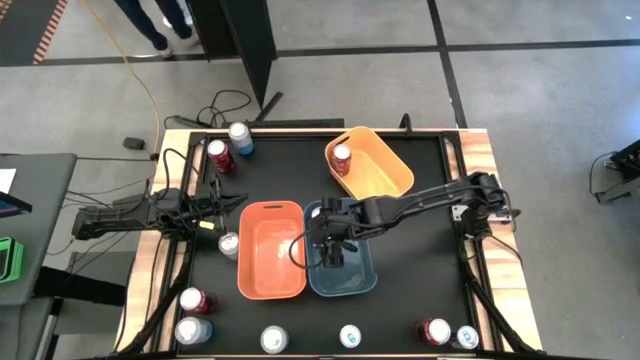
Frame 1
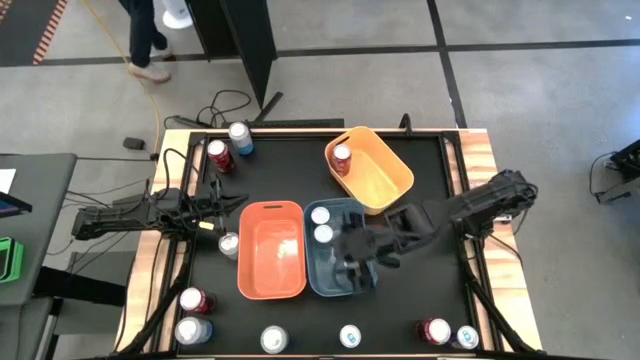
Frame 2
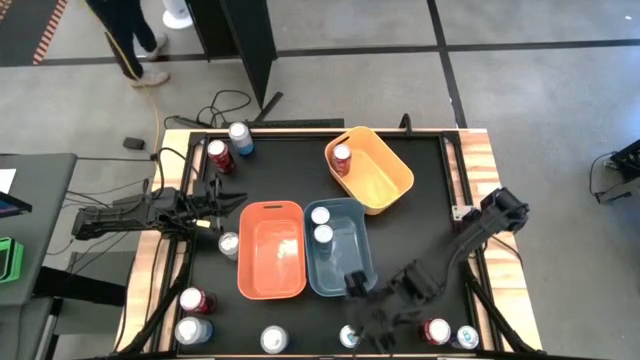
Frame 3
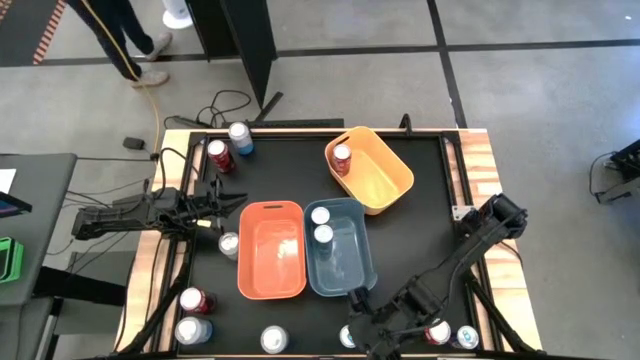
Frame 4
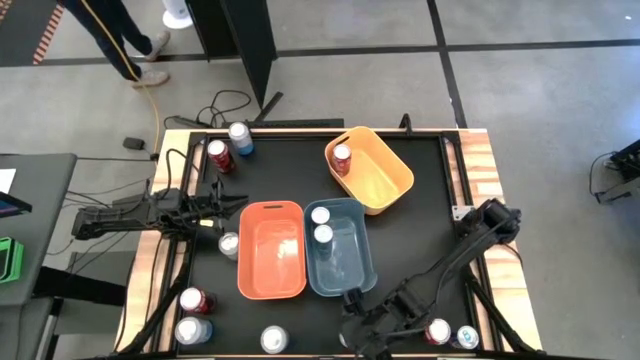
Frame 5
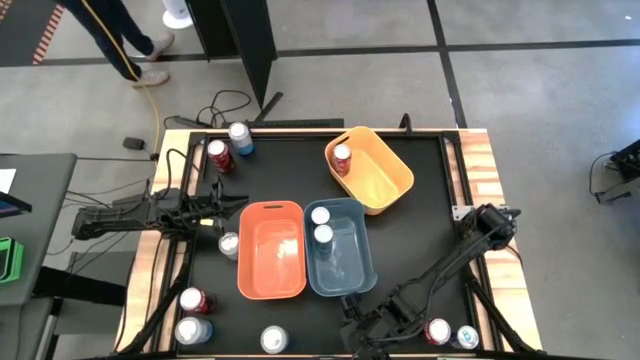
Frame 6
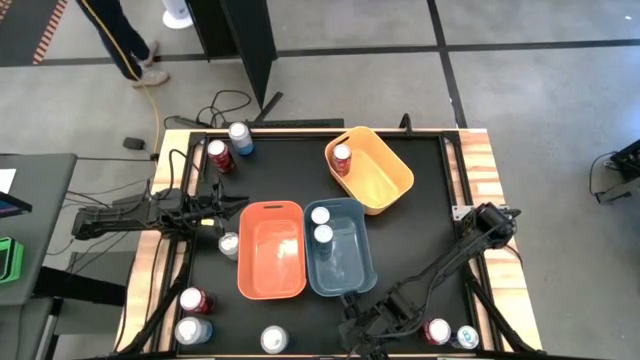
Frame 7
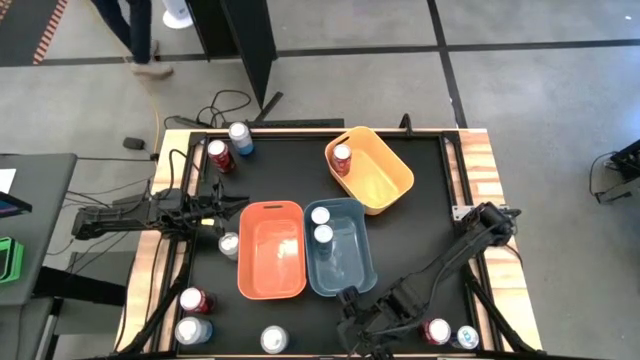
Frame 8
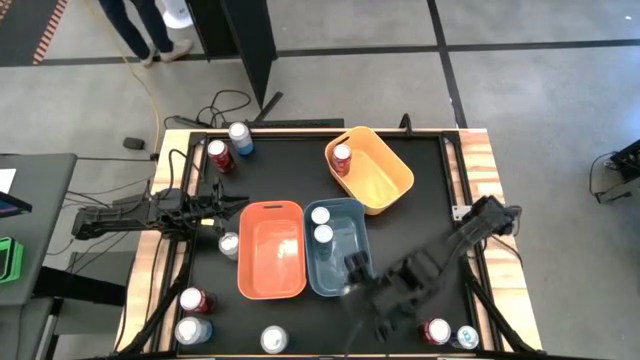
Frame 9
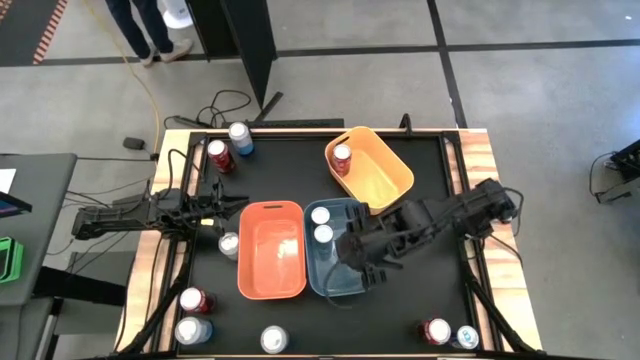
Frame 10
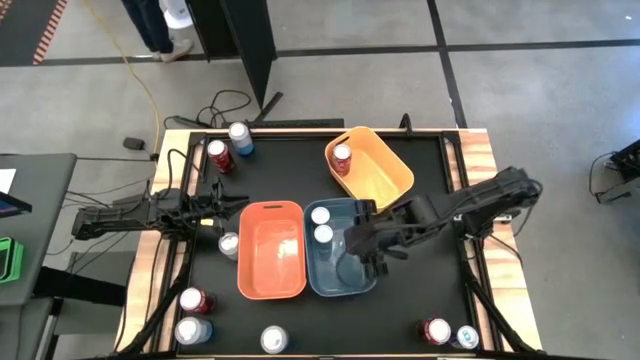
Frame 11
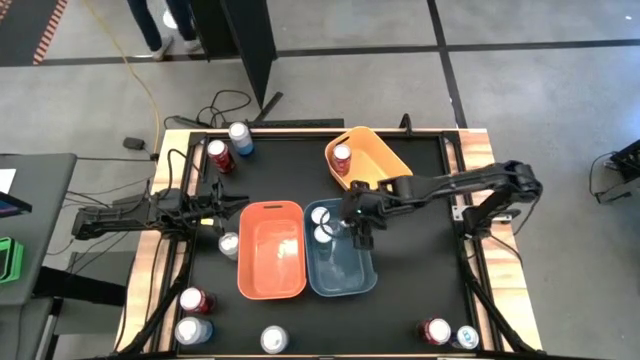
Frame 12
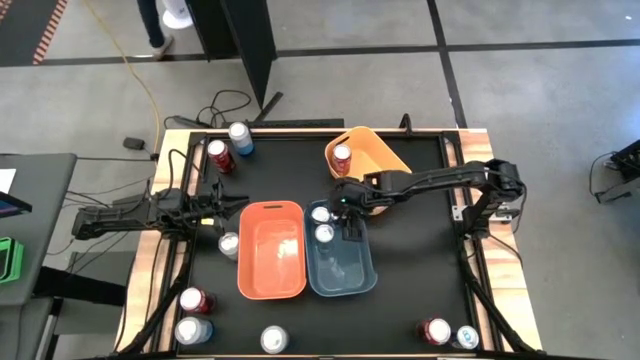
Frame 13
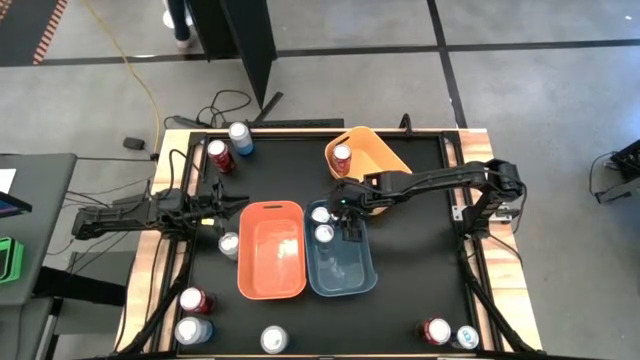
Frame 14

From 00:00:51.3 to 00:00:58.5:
Task: Sort soda cans
Put the left blue soda can into the blue bin

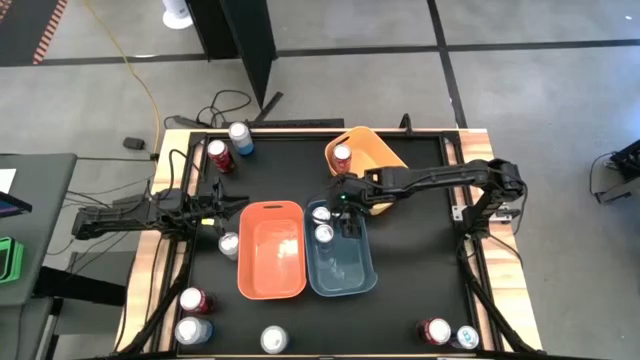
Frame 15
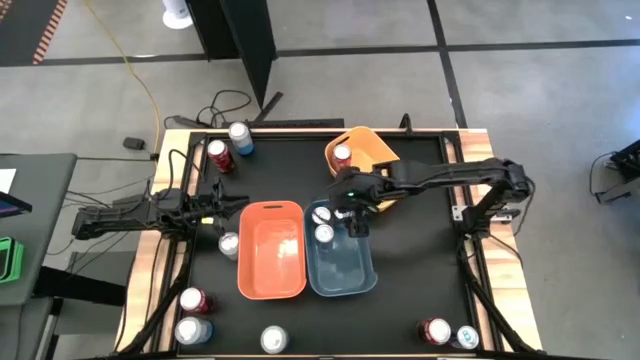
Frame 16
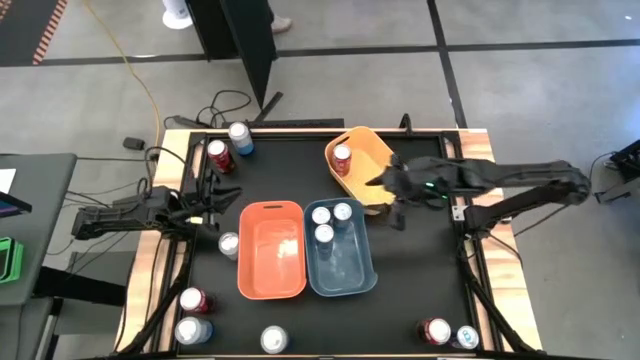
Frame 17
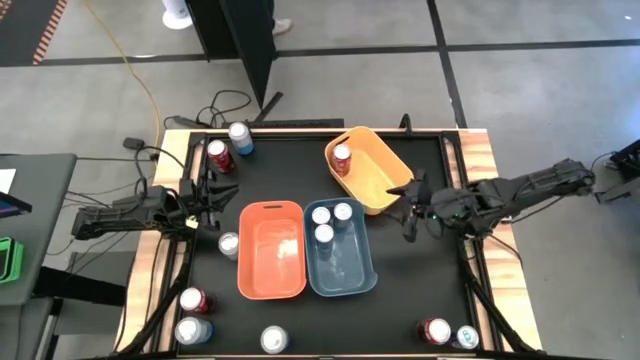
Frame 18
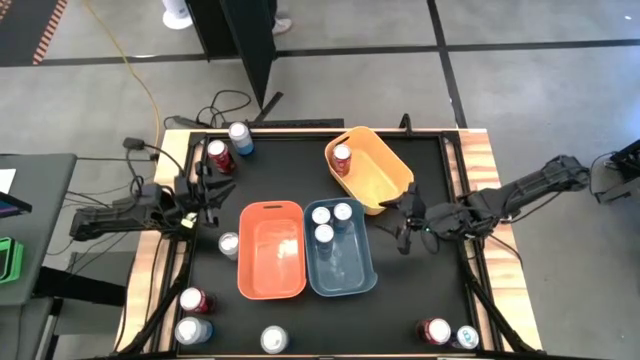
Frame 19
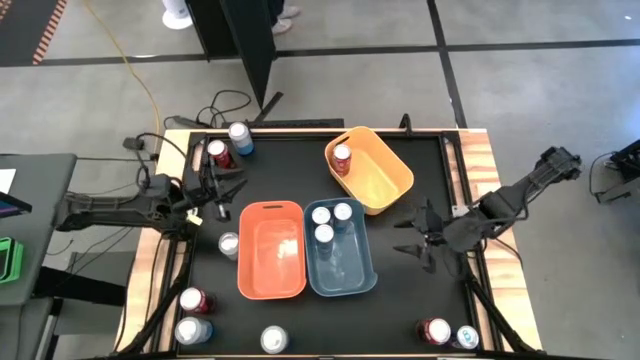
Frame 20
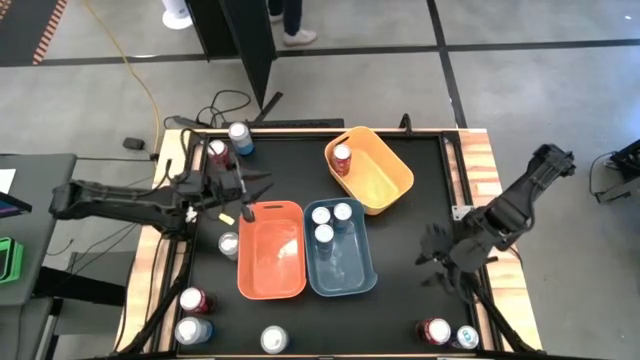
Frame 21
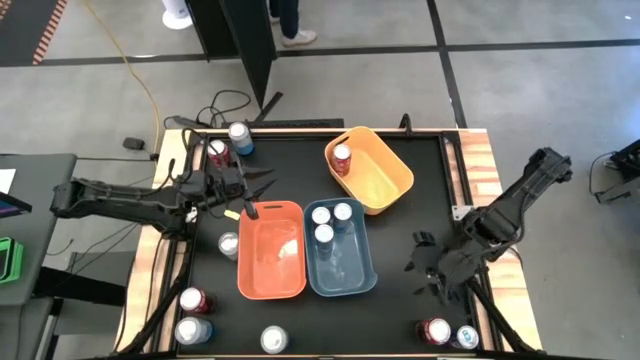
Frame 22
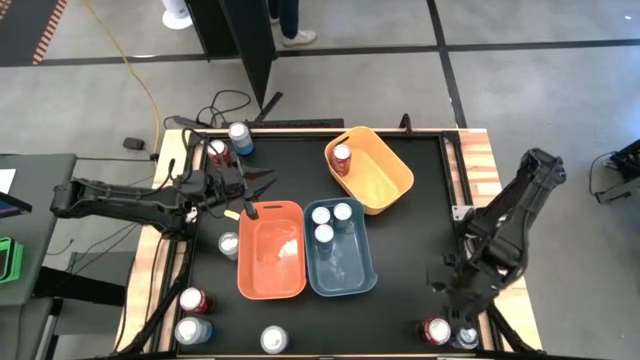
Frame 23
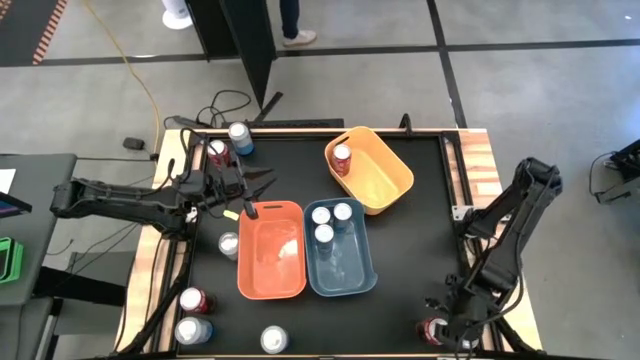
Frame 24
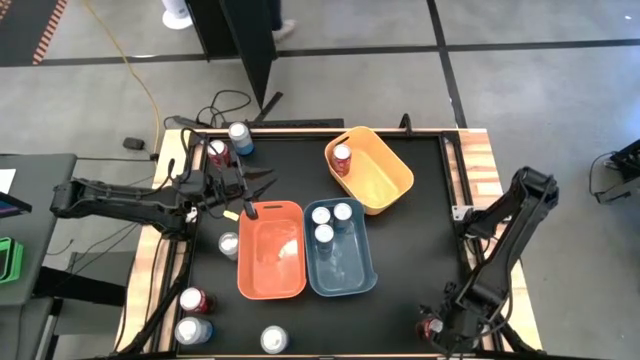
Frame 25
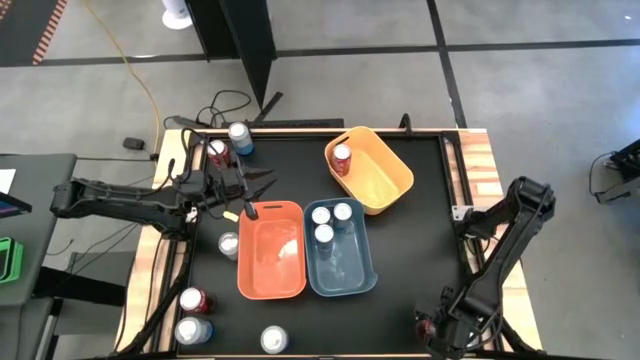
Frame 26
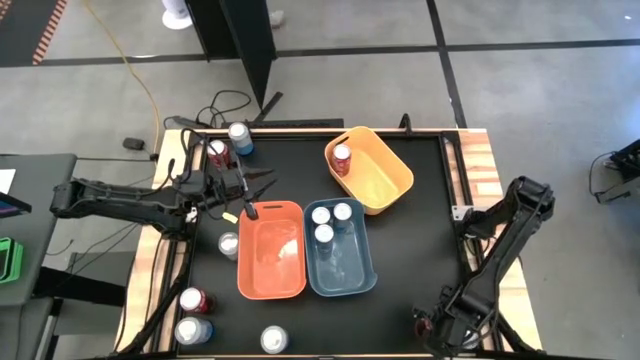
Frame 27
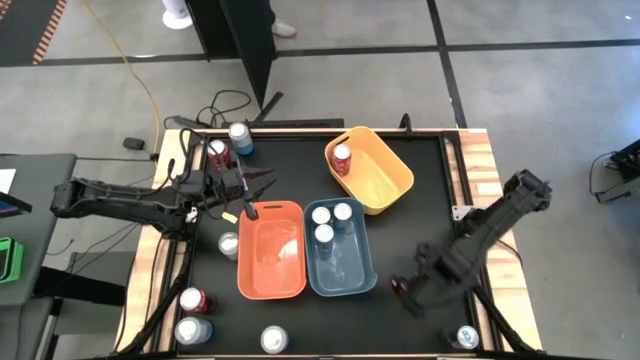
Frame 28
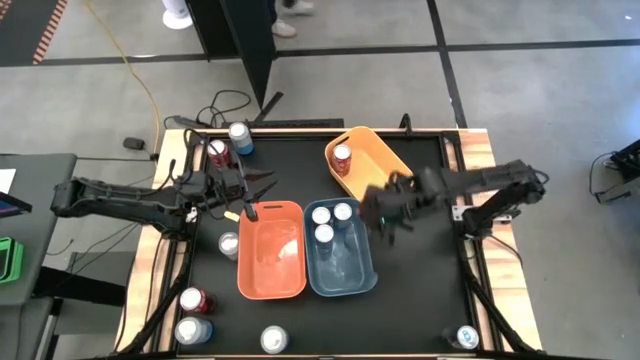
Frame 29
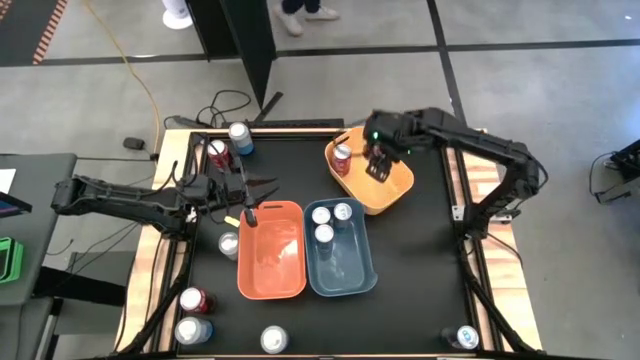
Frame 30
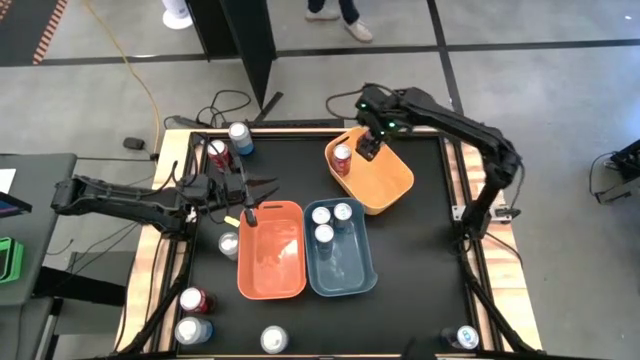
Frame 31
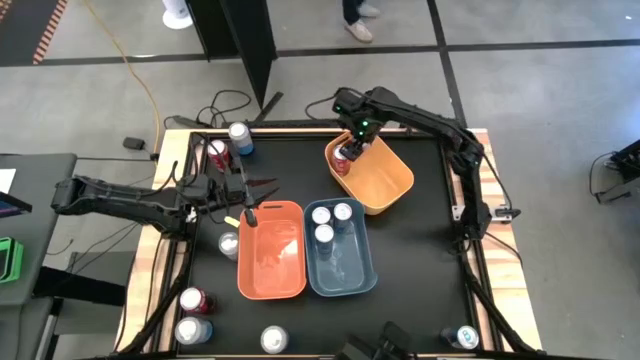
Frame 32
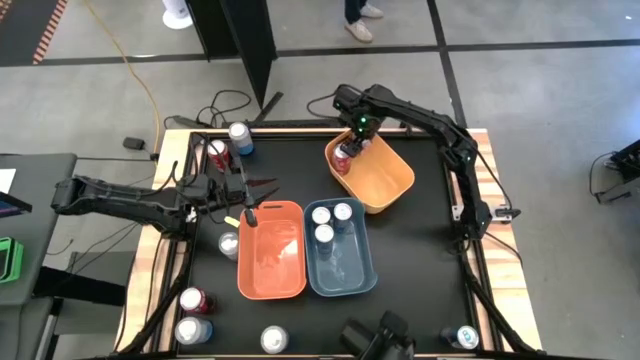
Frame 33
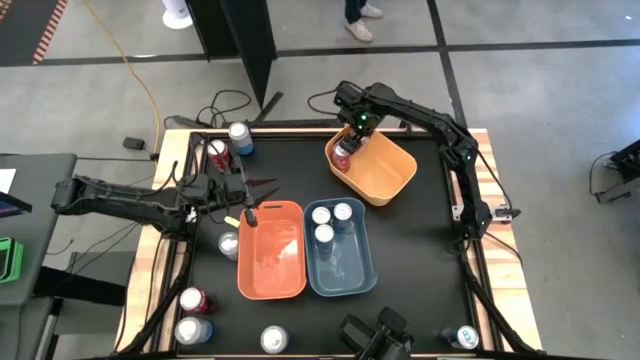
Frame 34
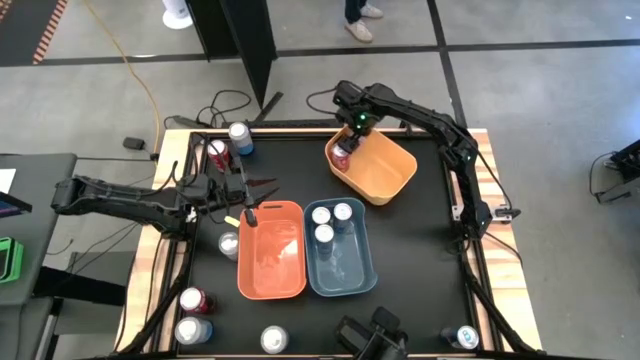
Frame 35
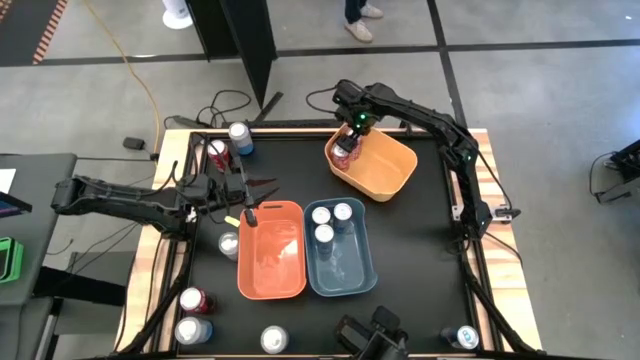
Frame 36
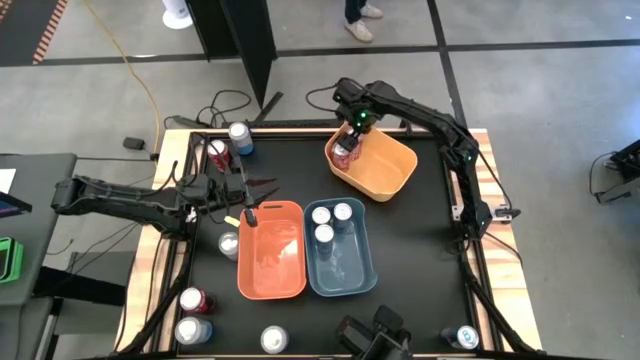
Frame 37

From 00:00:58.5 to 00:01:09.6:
Put the bottom right red soda can into the yellow bin

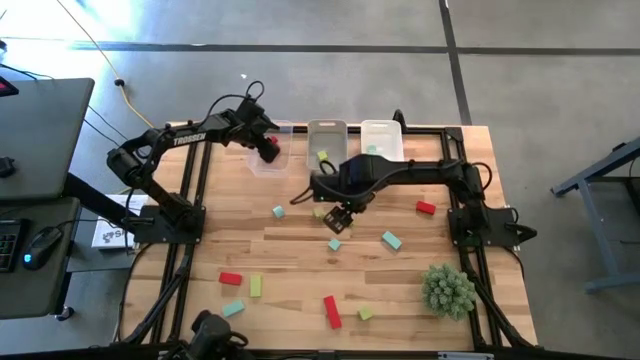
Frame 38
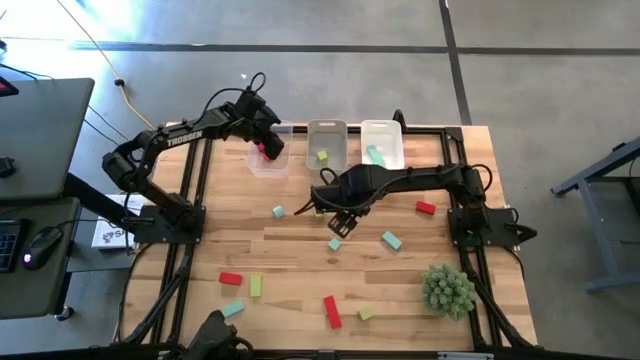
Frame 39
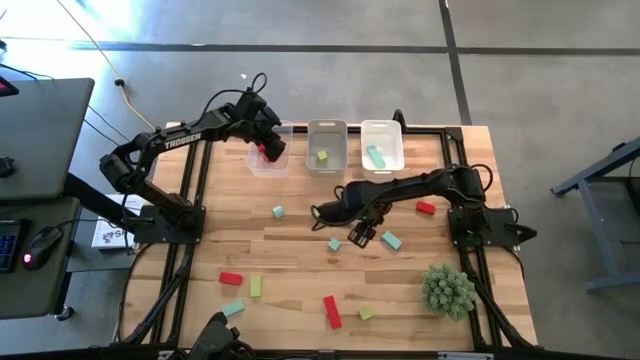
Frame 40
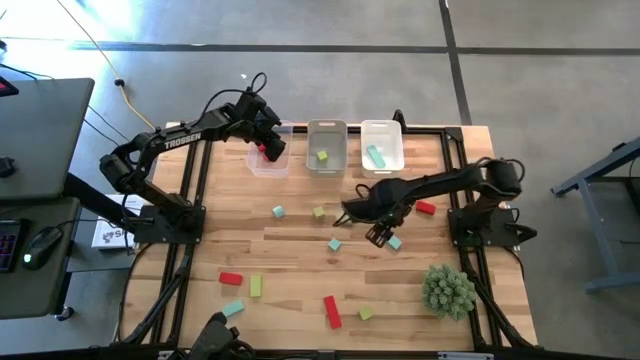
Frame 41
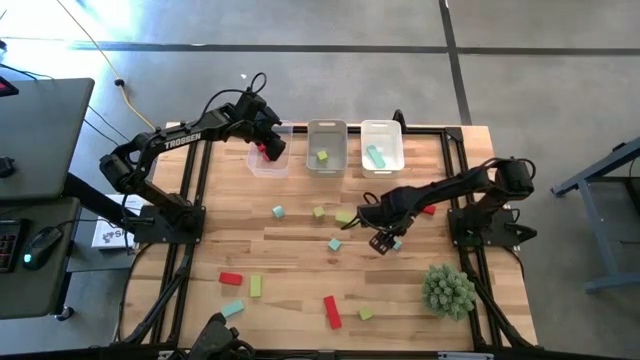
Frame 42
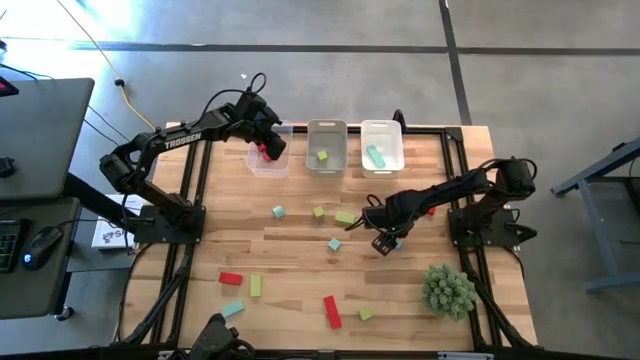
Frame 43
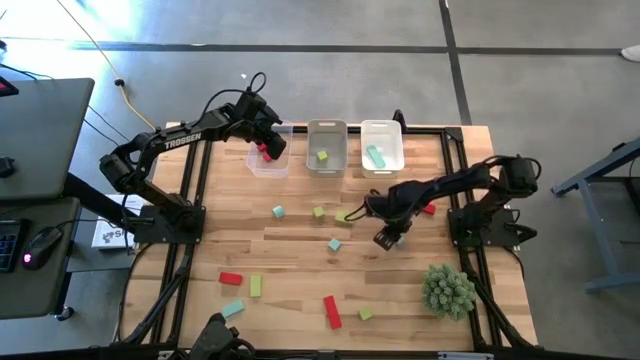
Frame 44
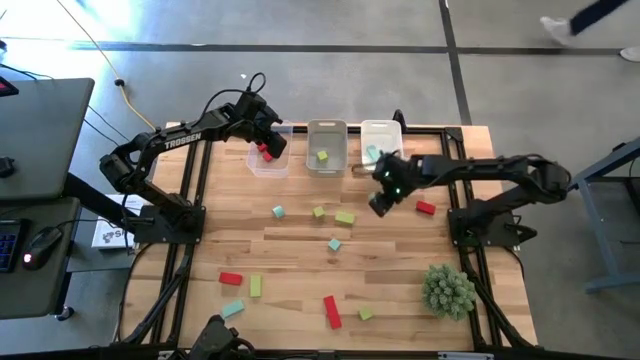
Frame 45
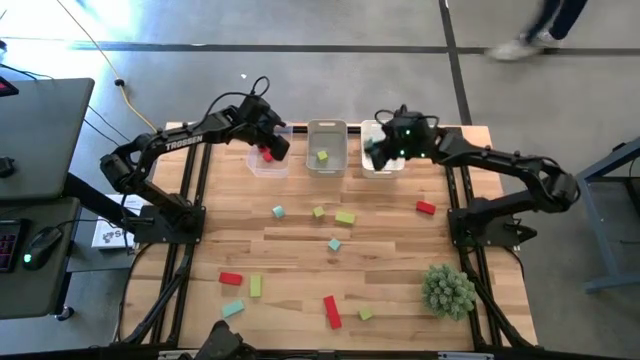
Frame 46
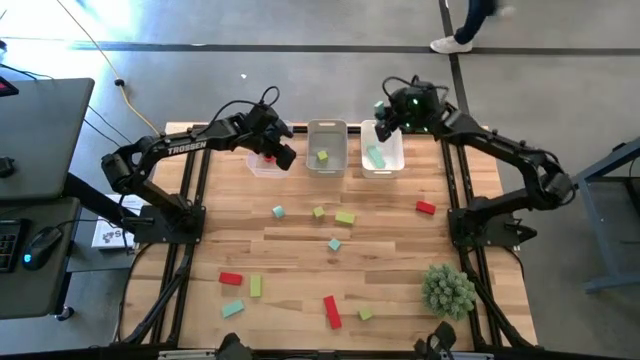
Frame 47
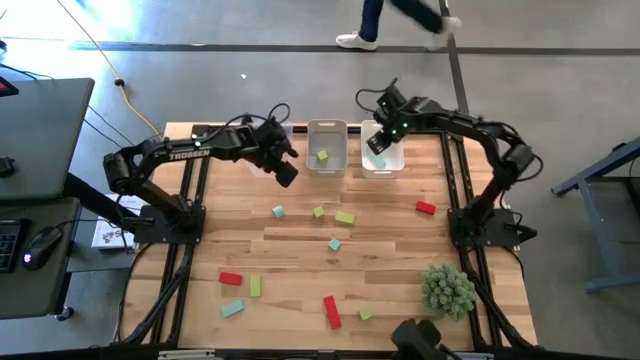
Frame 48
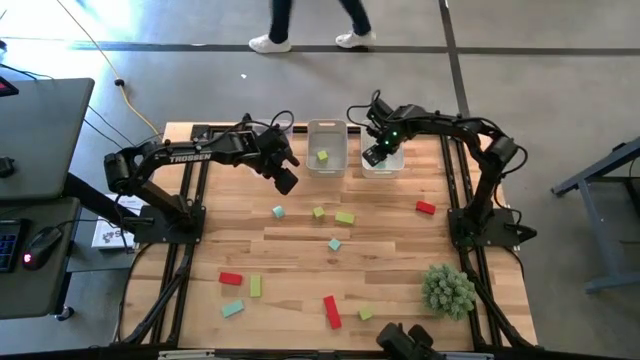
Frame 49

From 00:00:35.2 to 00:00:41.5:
Task: Sort & place blocks by color
Put the blue block into the white bin
